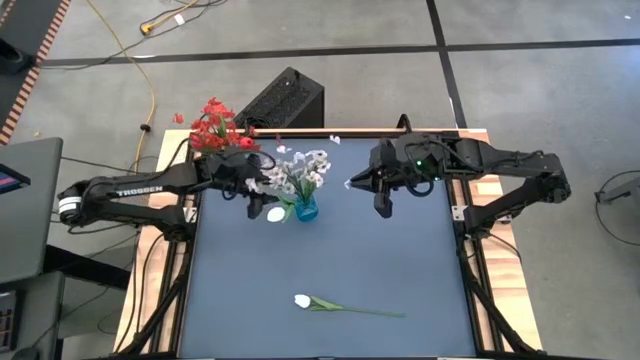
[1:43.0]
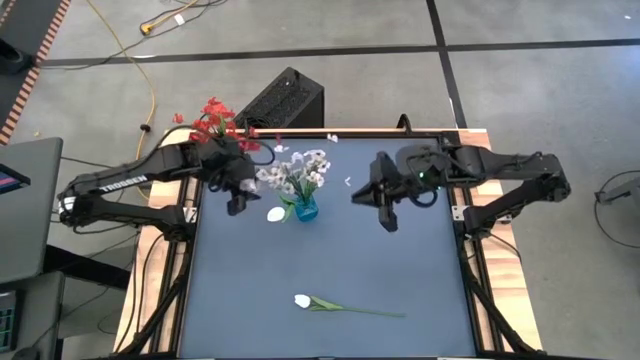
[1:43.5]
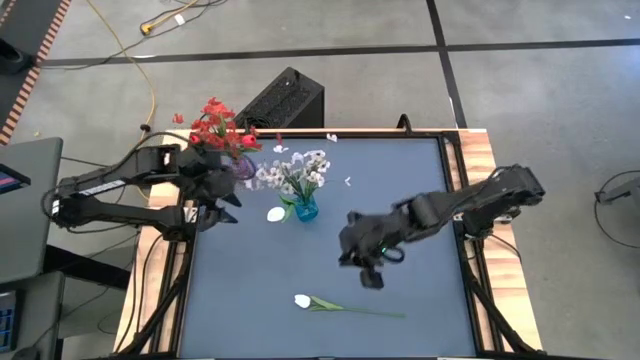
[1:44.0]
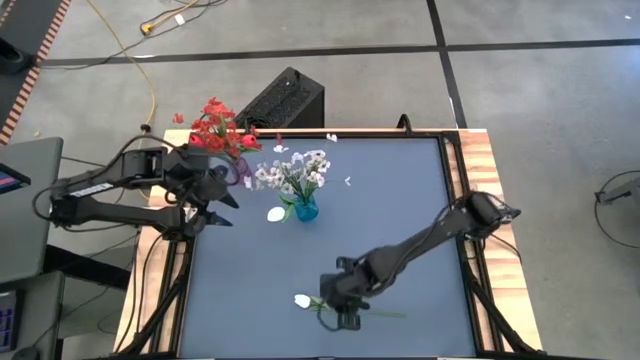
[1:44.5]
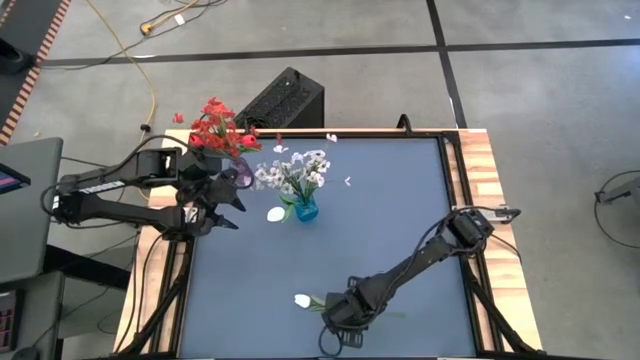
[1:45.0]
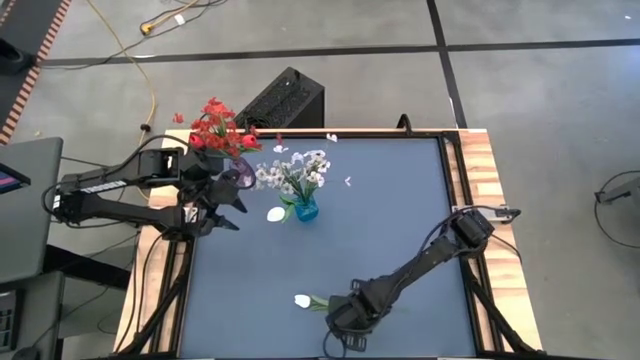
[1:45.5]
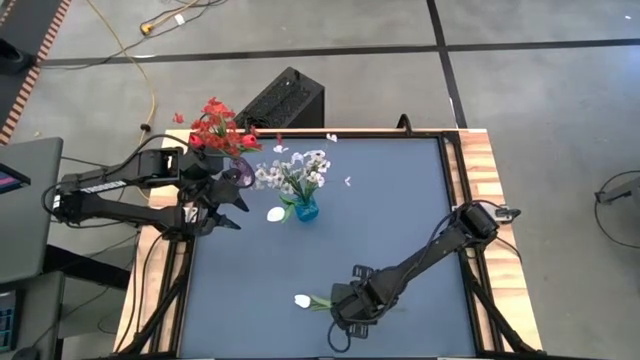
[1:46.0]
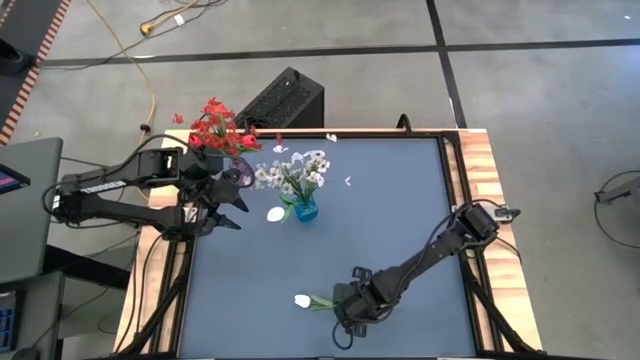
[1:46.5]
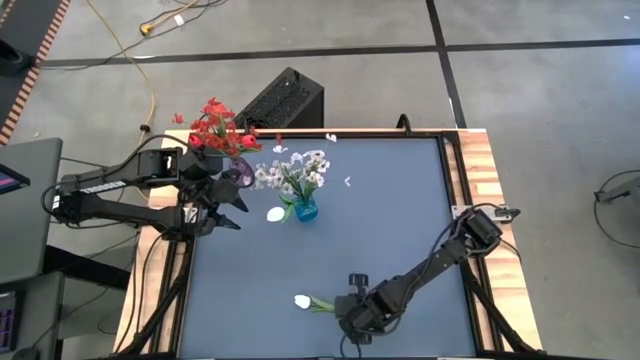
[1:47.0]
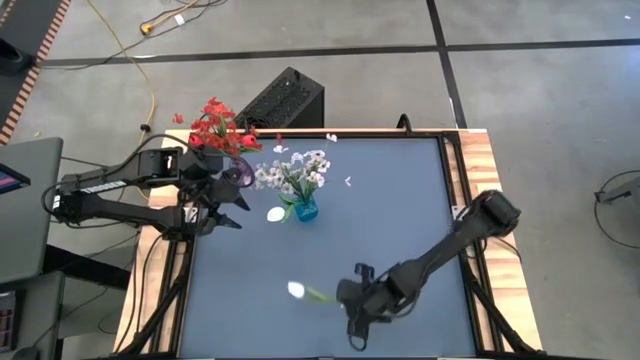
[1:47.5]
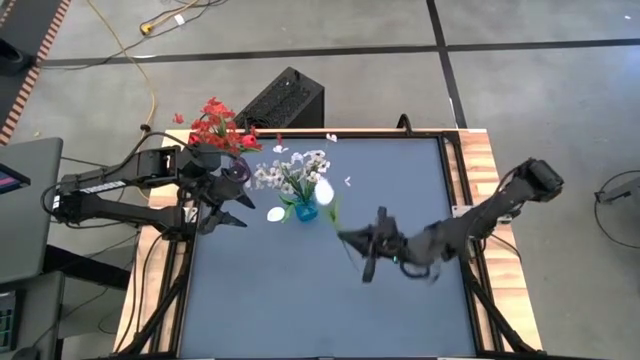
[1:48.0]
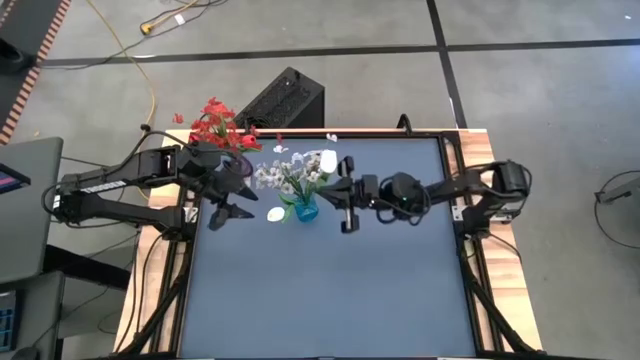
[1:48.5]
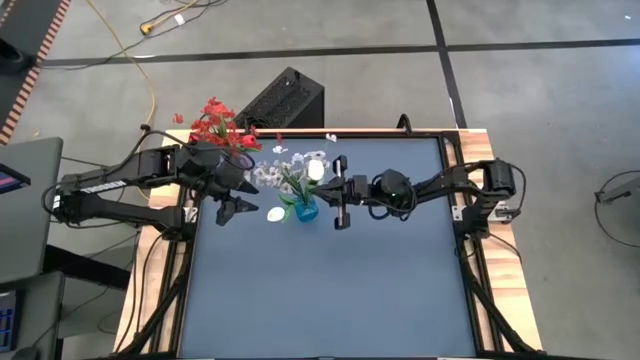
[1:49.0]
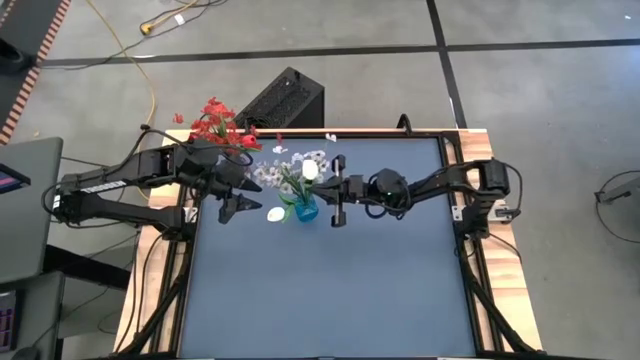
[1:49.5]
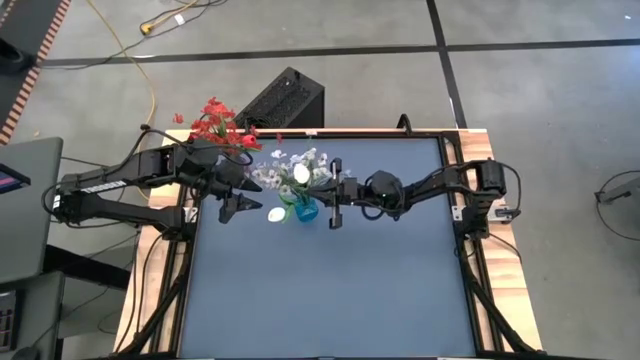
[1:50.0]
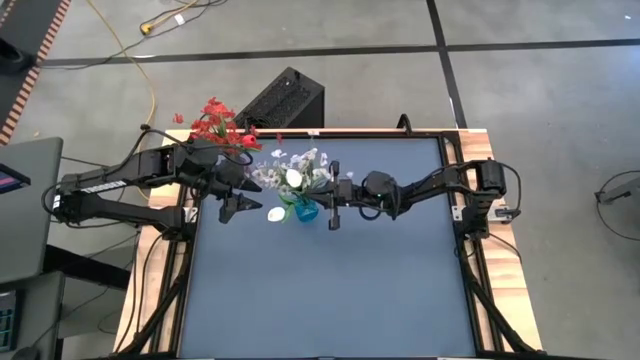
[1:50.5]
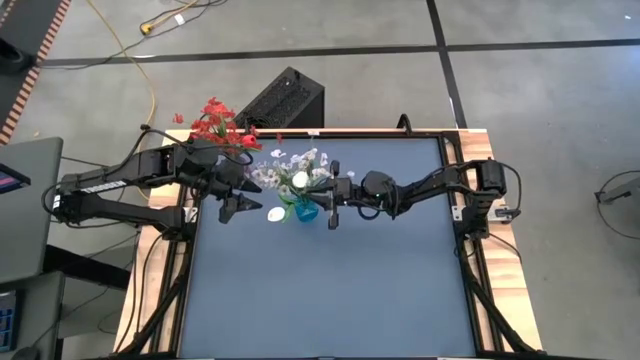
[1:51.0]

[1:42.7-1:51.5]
Task: Sort flowers into vase by color
Put the white tulip into the blue vase

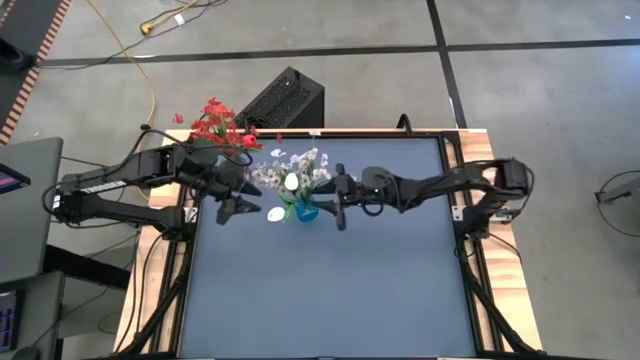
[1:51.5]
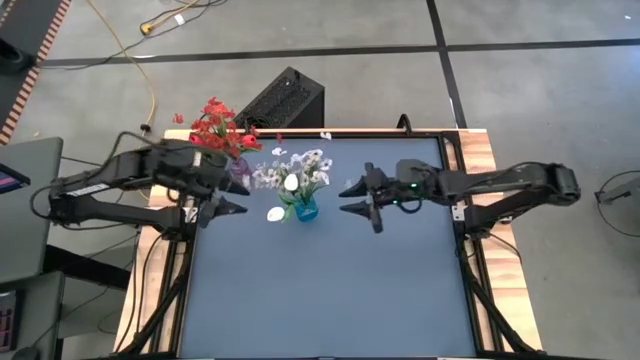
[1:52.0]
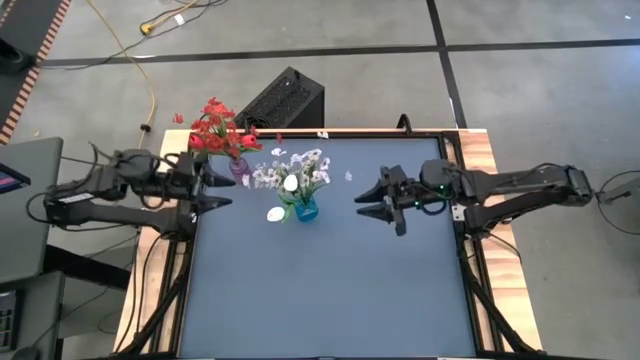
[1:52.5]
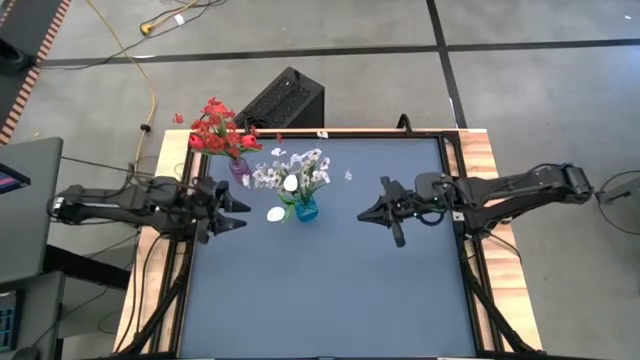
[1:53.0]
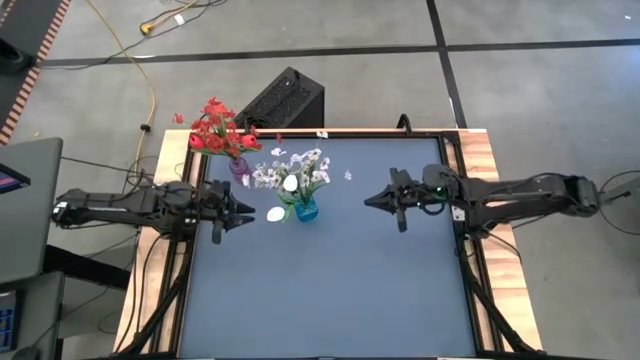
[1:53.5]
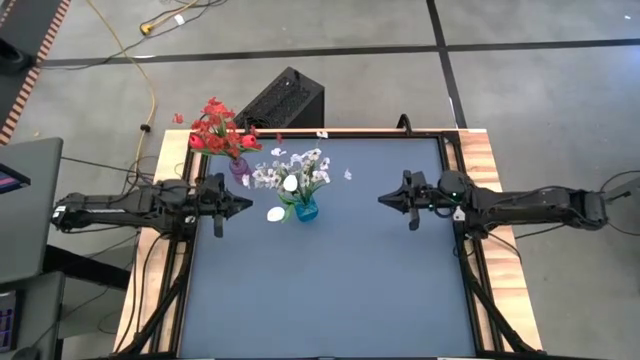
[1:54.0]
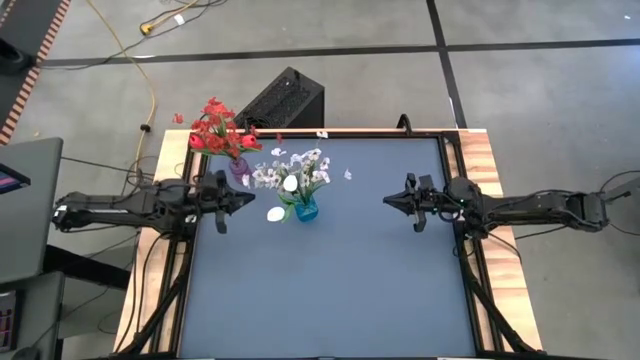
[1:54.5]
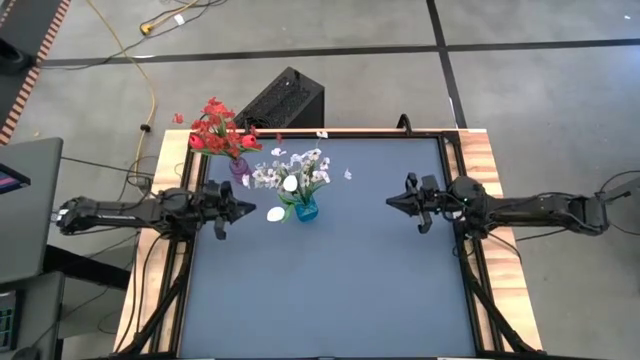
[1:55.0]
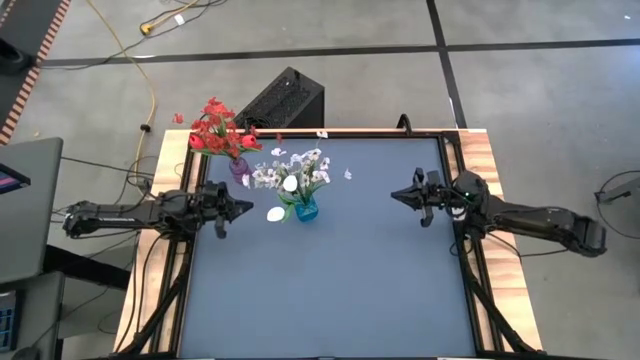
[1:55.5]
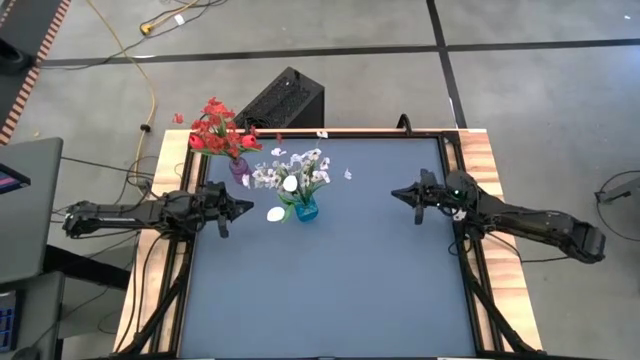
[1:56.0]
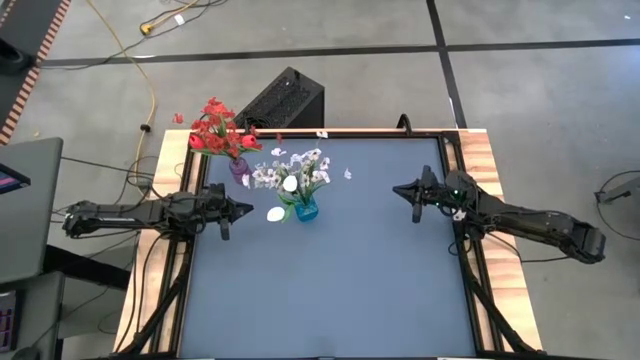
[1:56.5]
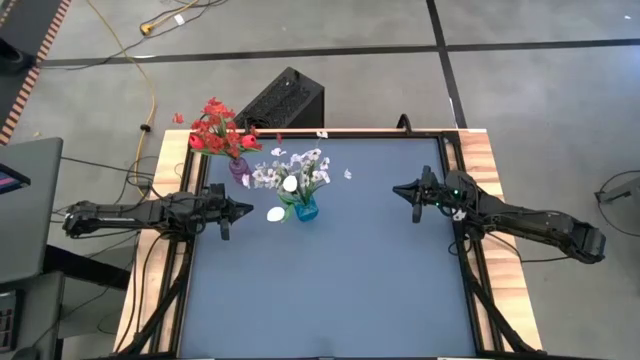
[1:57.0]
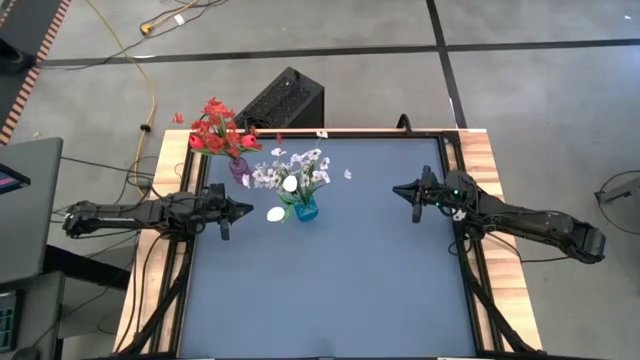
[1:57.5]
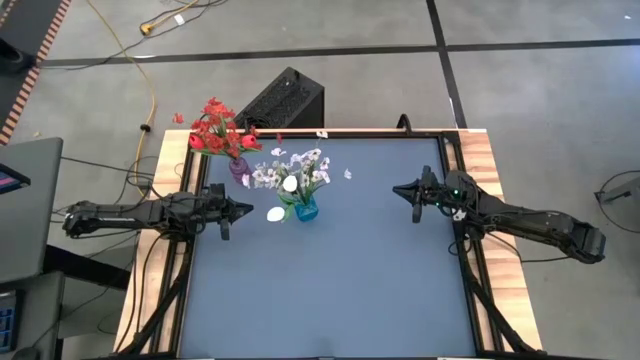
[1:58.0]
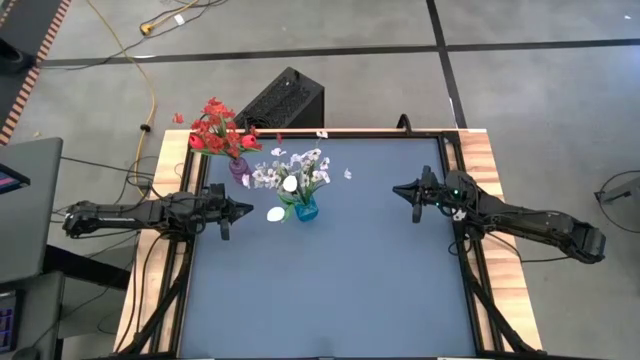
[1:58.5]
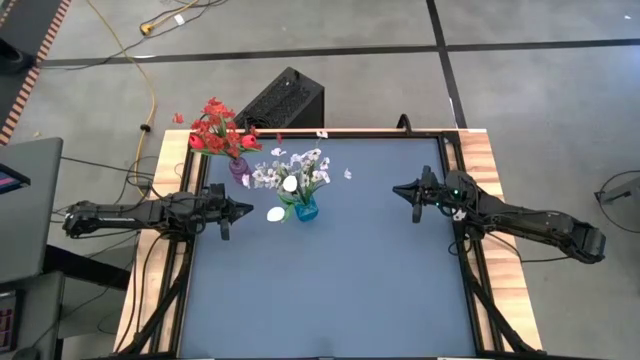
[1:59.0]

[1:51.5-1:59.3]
Return to Home Position

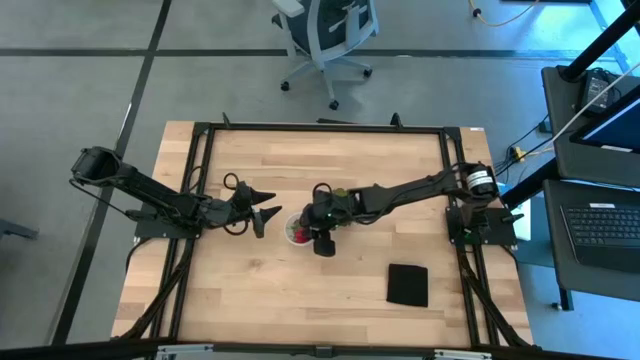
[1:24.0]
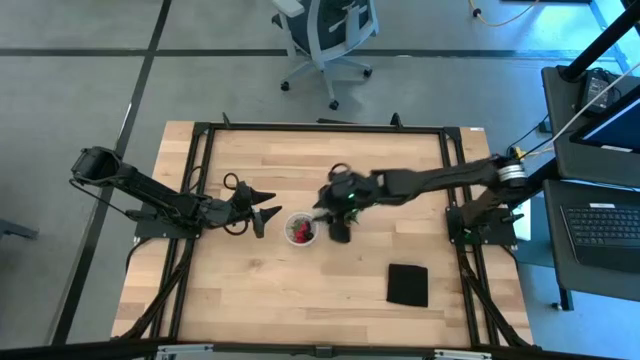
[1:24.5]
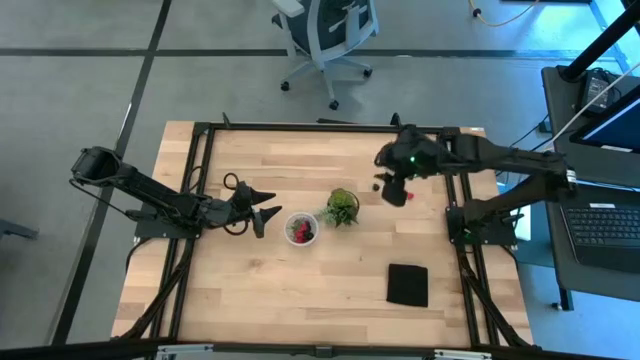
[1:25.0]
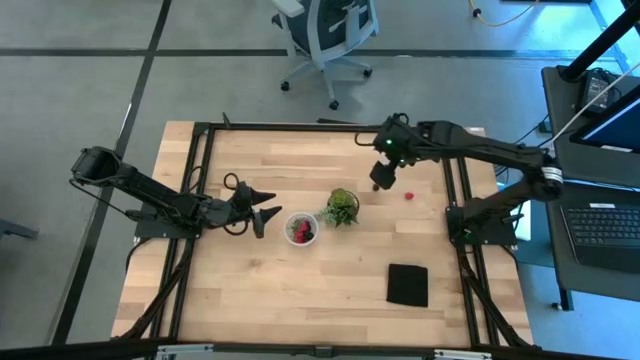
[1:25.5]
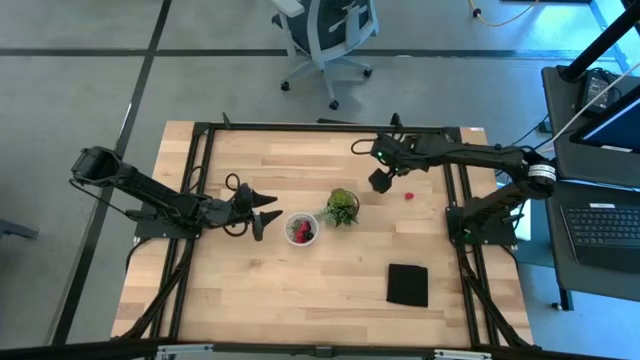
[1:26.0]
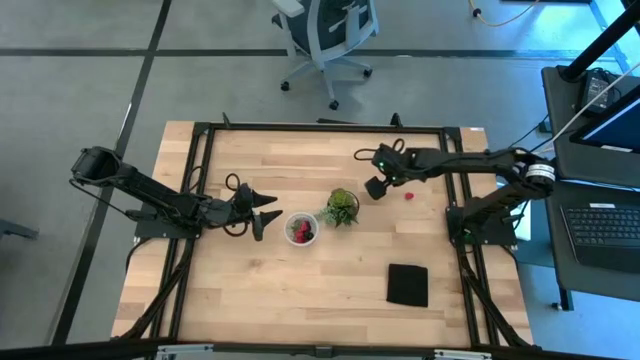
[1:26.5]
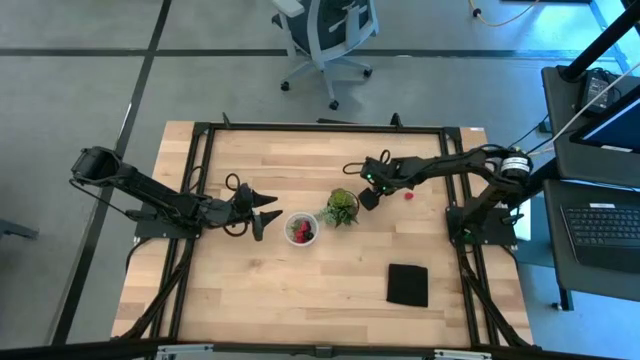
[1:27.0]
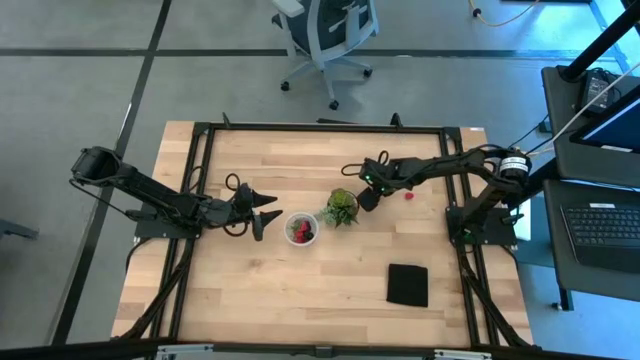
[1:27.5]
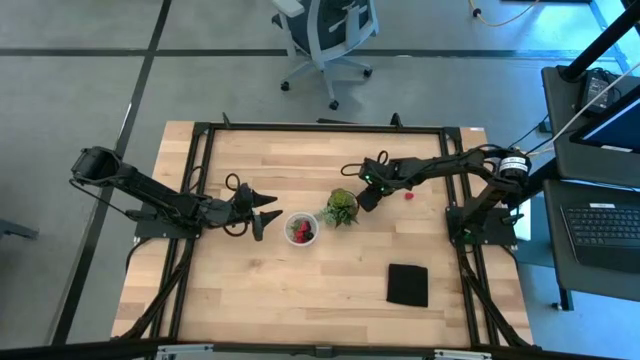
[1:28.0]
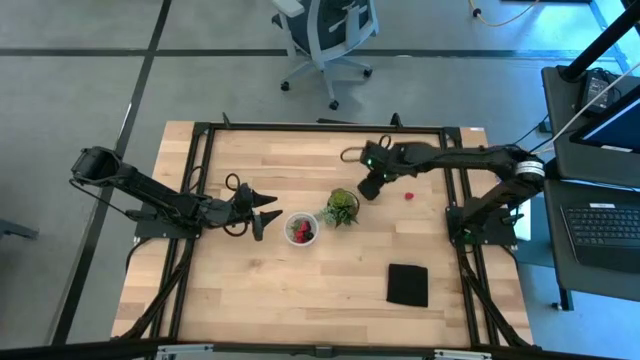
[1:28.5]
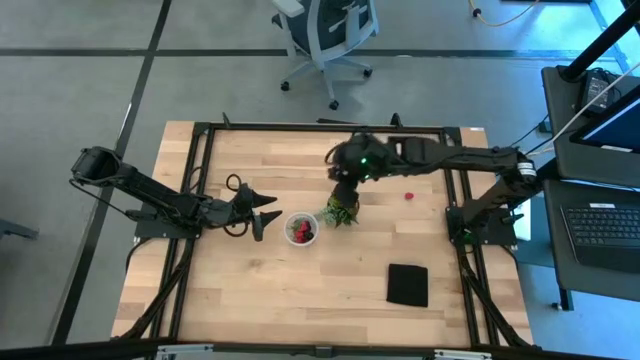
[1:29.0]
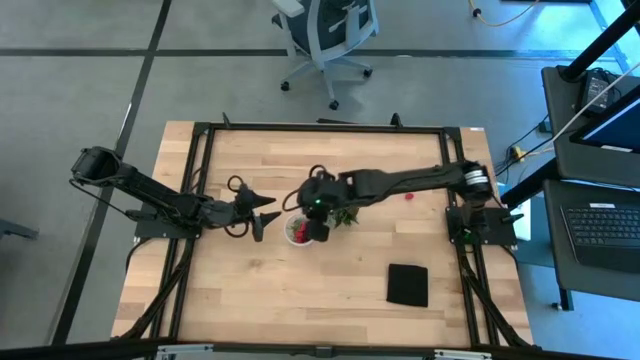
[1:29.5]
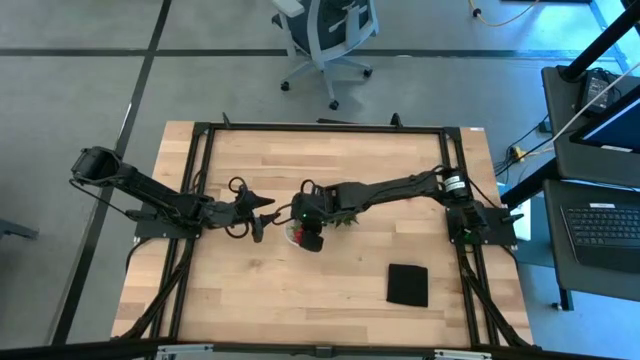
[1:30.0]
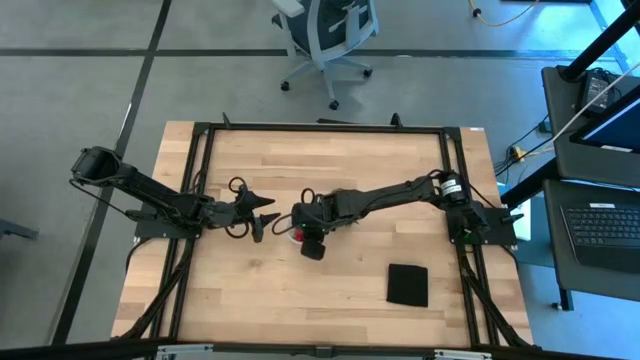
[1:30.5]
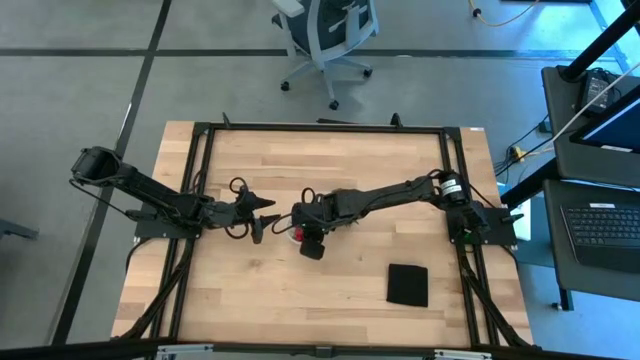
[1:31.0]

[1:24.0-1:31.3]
Task: Pick and placing Produce into tupperware
Put the blackberry into the transparent container
